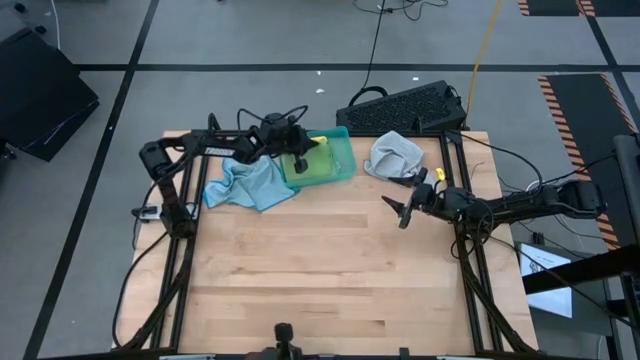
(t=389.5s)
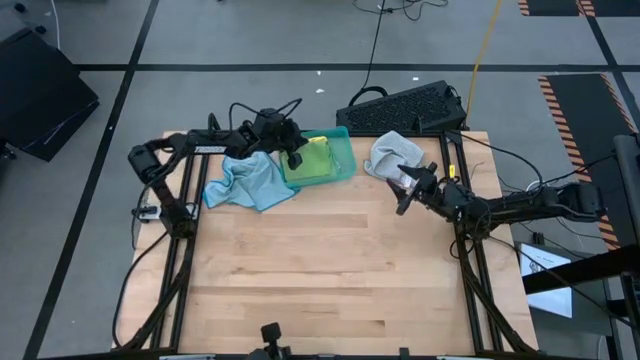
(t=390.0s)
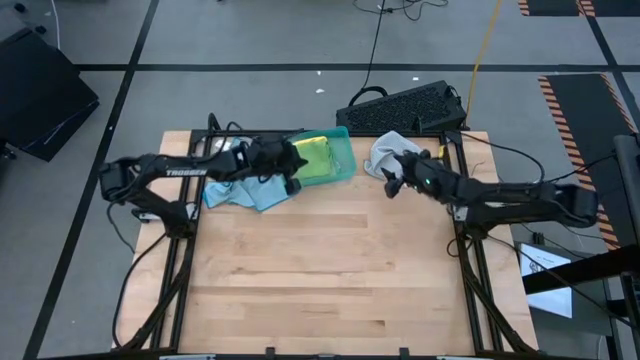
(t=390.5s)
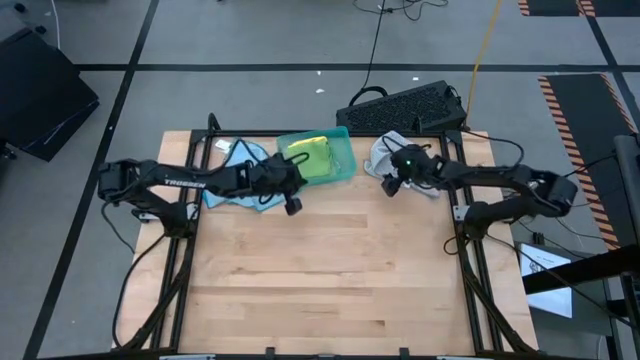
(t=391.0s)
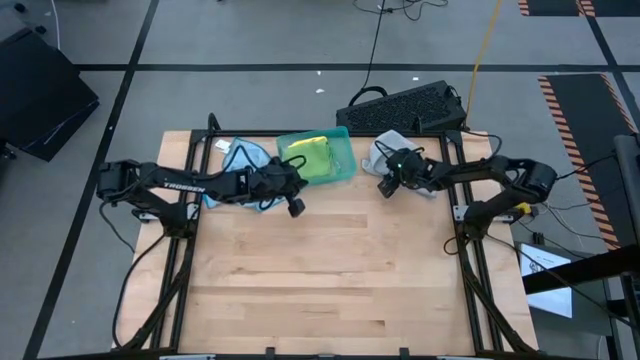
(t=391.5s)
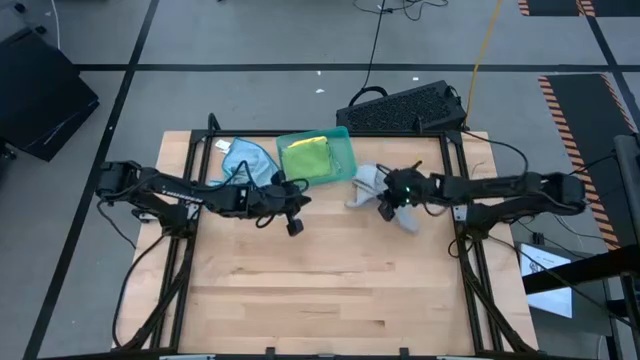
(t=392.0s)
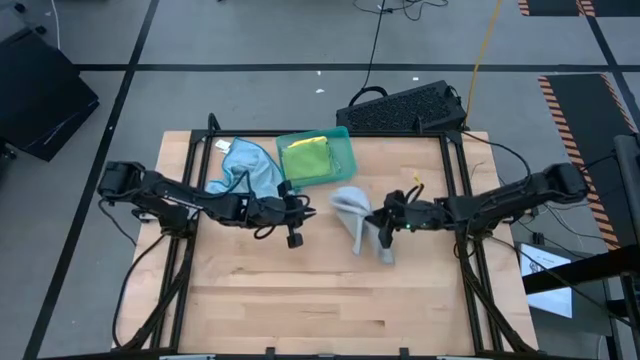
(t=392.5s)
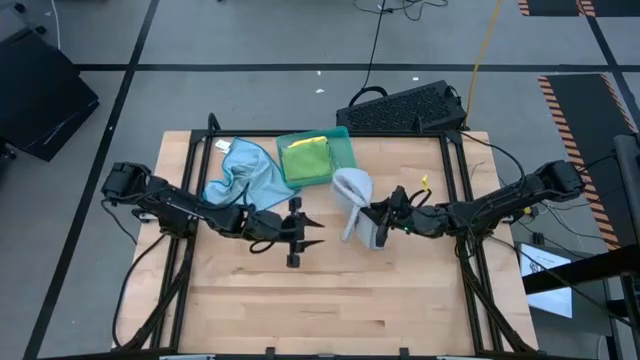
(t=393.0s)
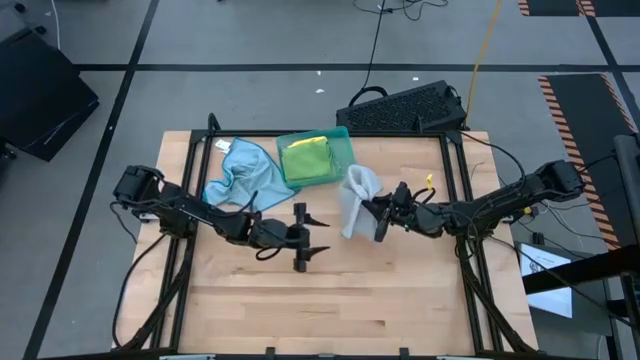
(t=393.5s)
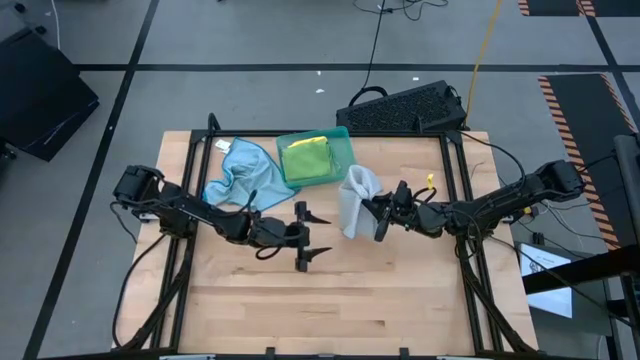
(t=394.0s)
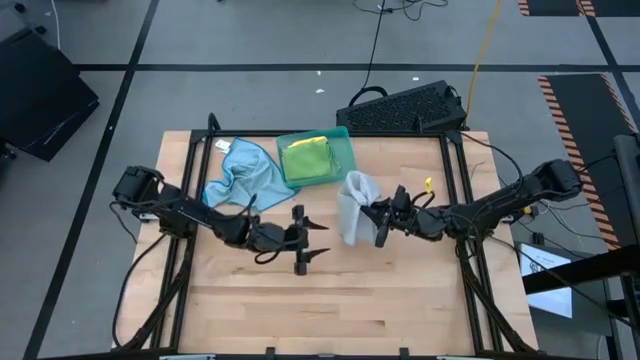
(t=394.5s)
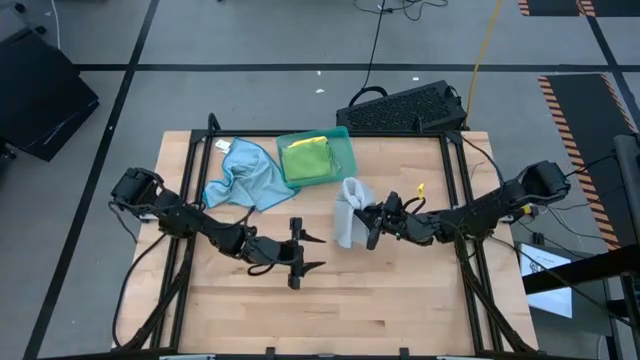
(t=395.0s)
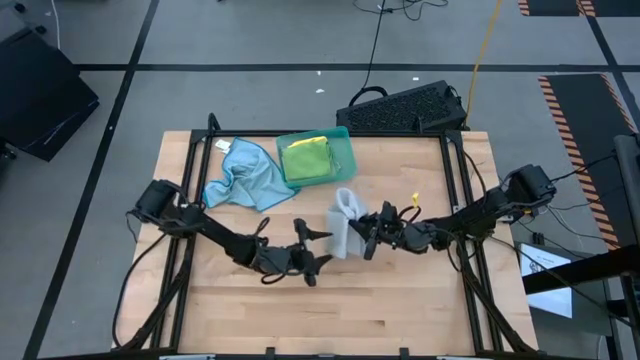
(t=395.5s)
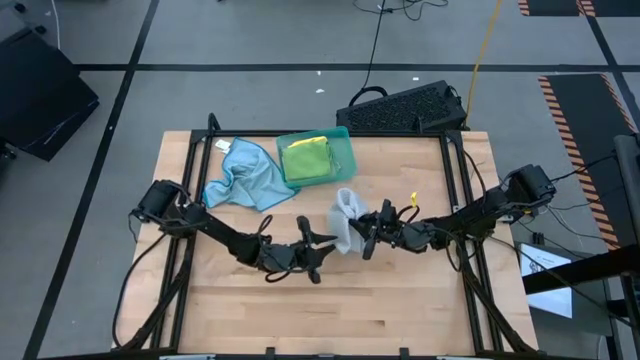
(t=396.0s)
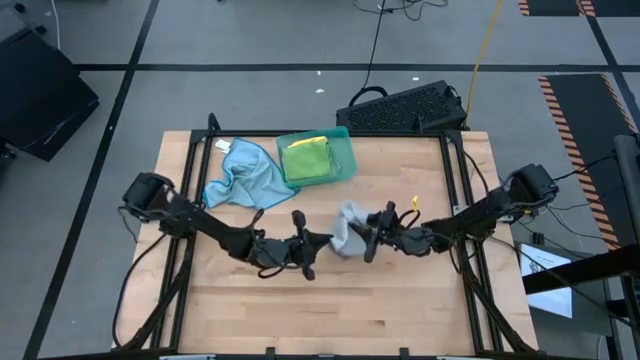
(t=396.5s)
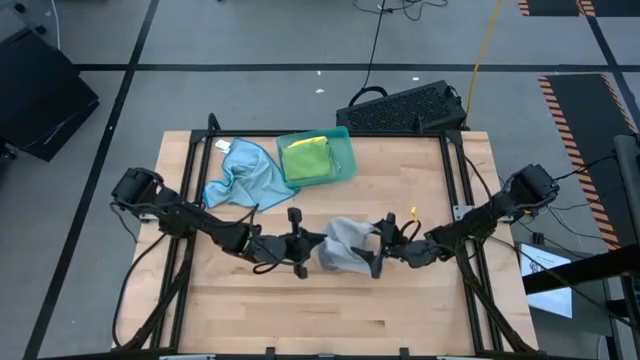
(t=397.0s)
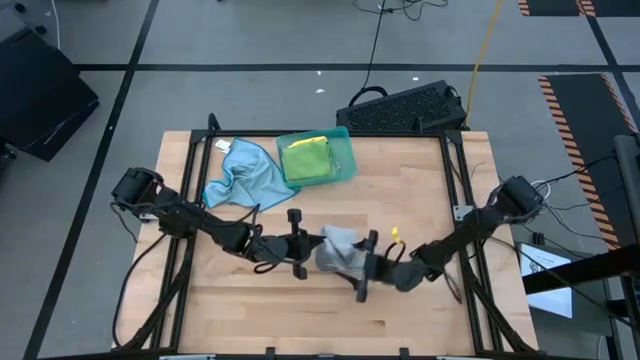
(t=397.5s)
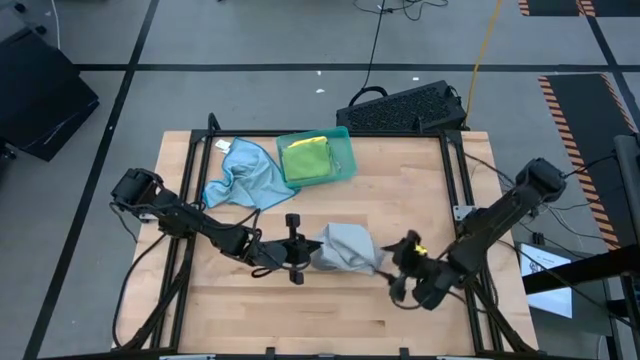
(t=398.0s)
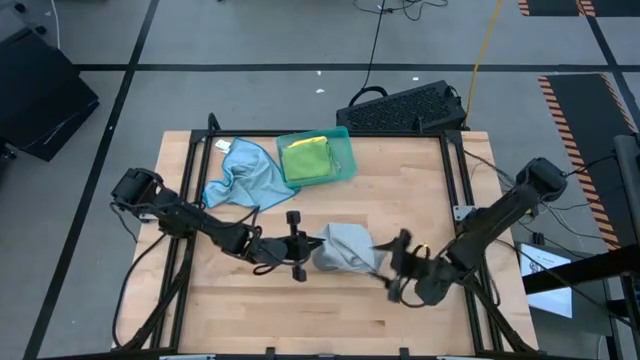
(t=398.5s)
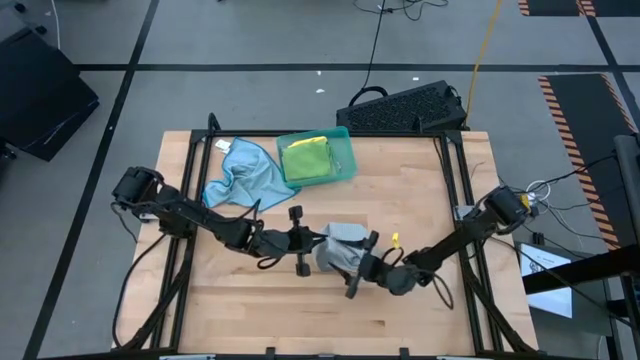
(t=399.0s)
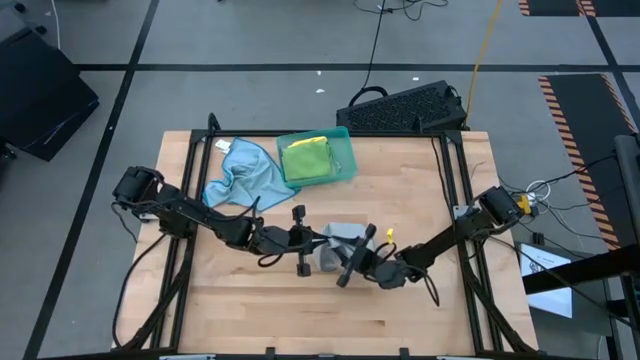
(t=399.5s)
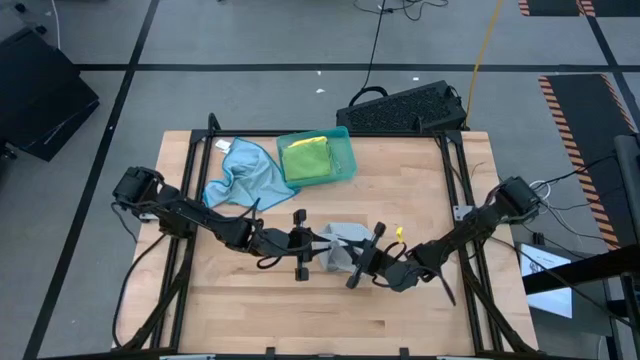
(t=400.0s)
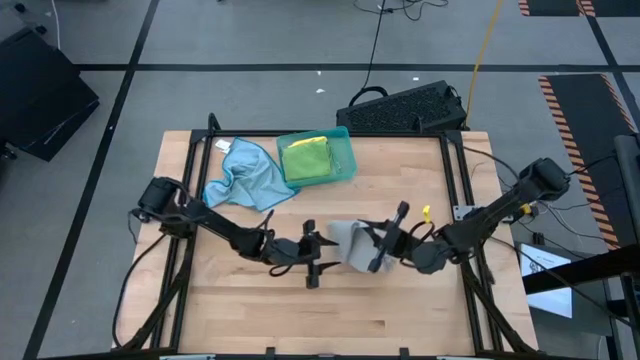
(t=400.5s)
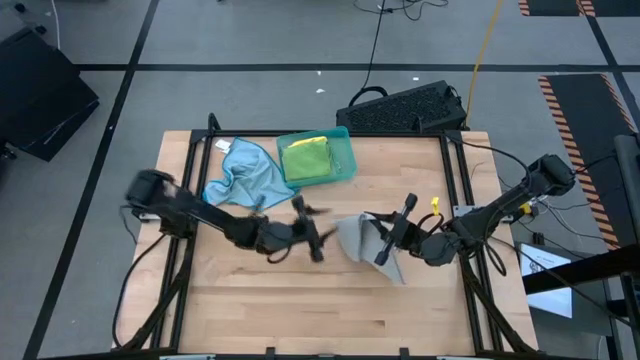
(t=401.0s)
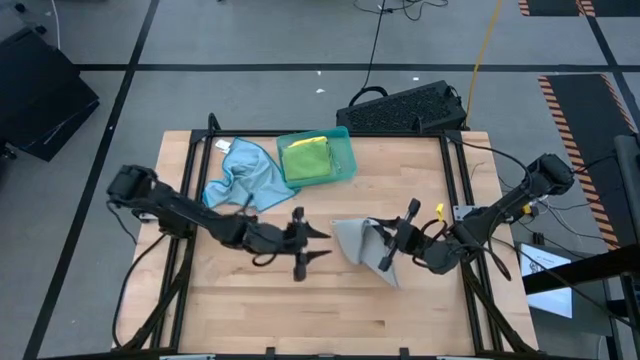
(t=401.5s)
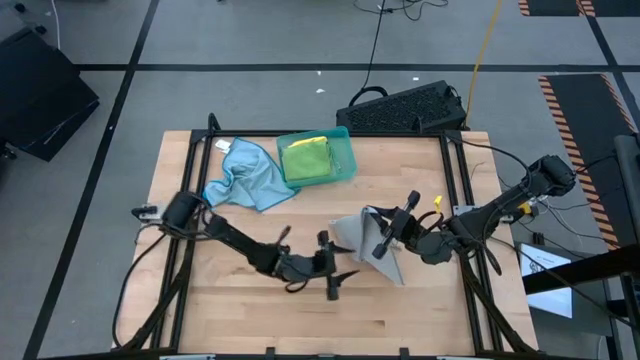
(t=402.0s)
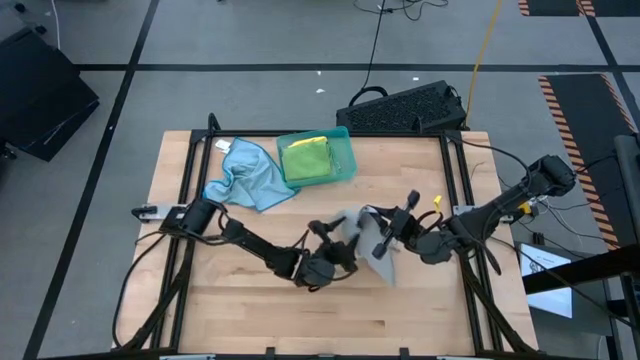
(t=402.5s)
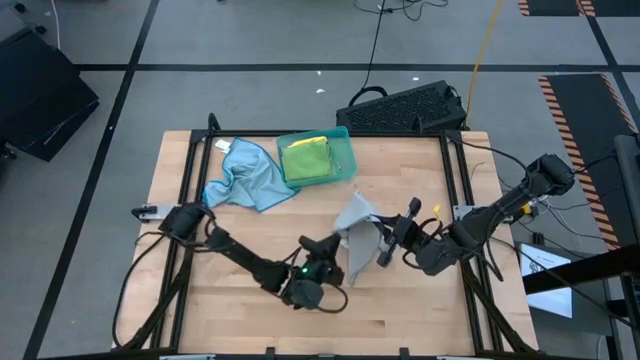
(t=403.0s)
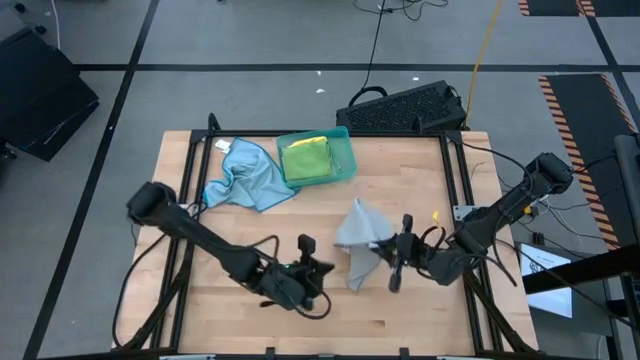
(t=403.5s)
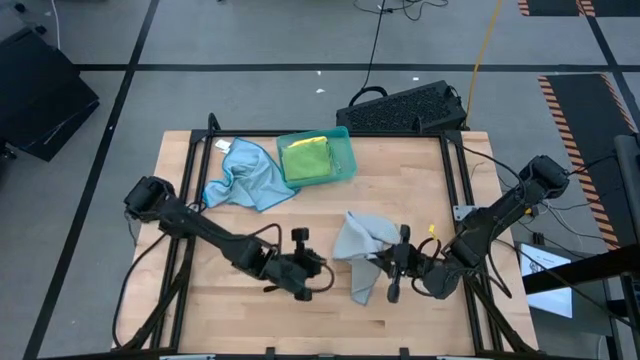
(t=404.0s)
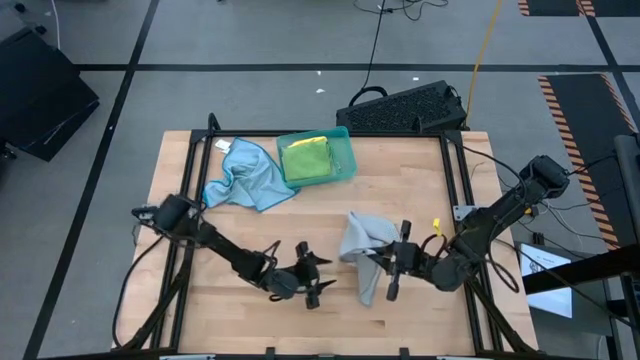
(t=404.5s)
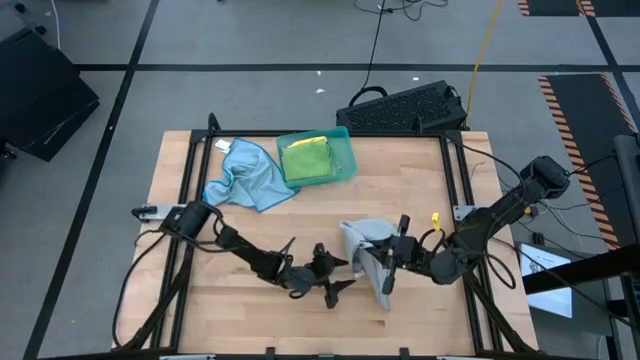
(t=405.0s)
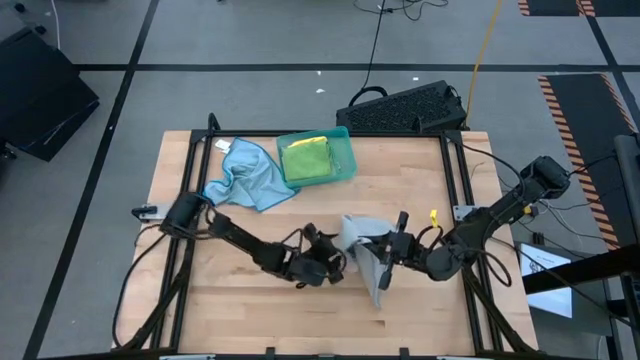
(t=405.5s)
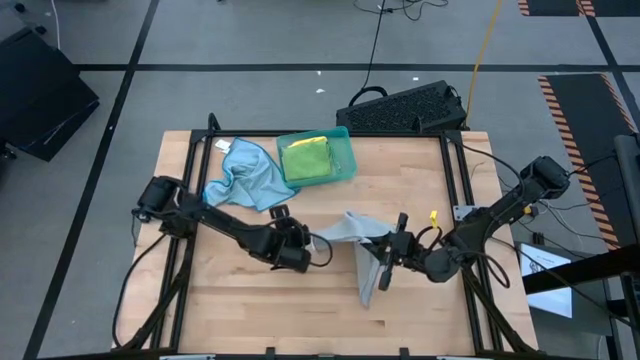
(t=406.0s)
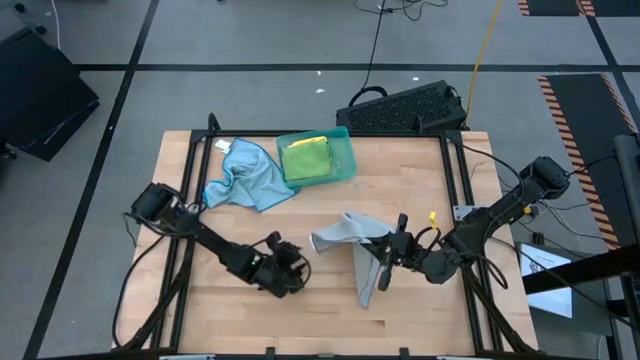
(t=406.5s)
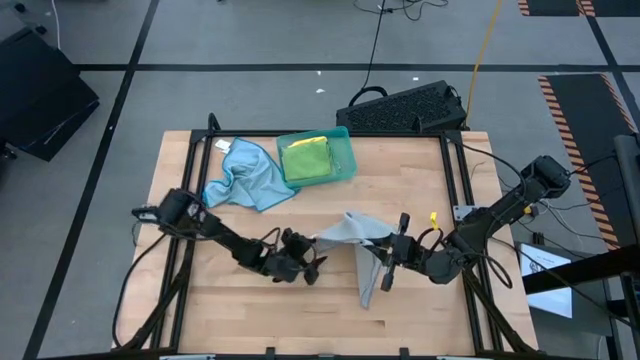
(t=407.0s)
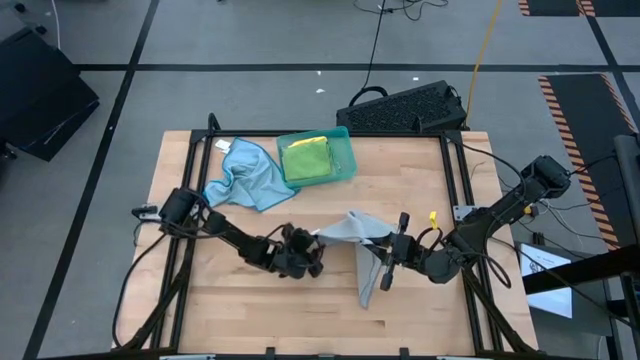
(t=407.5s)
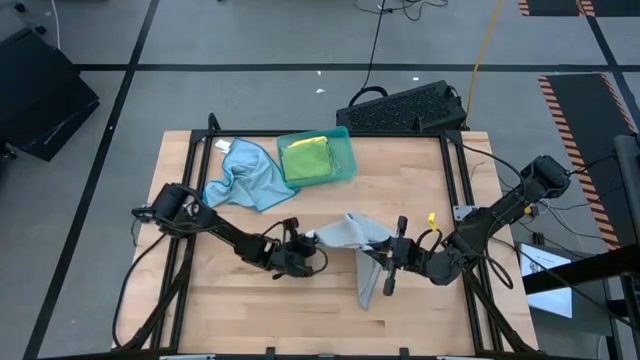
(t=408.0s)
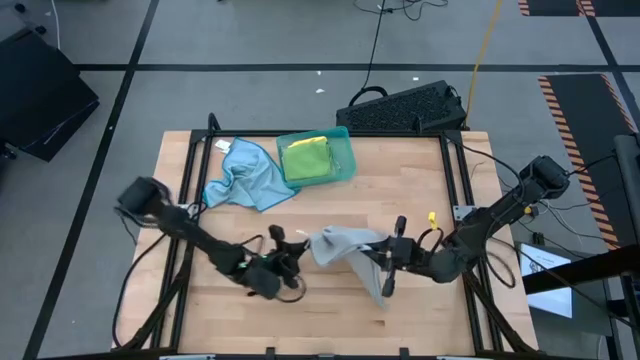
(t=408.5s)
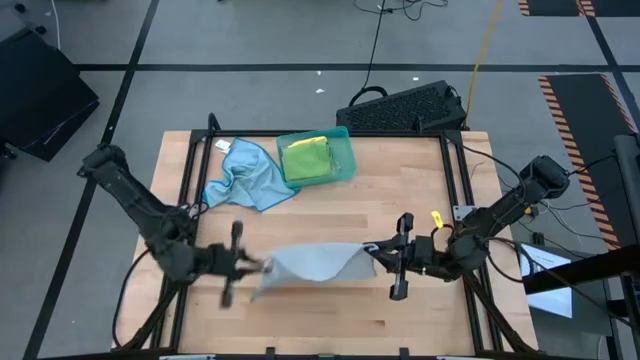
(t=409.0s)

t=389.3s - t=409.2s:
Task: Fold microfiber towels
Fold the gray microfiber cloth

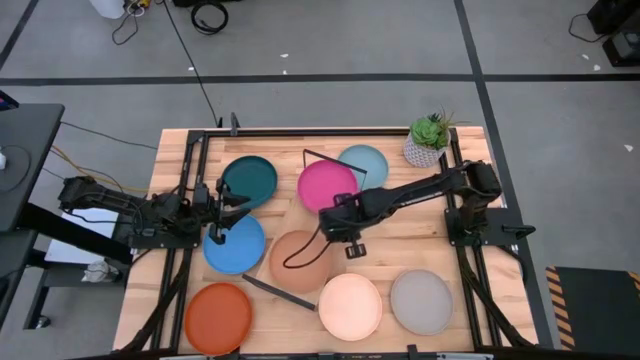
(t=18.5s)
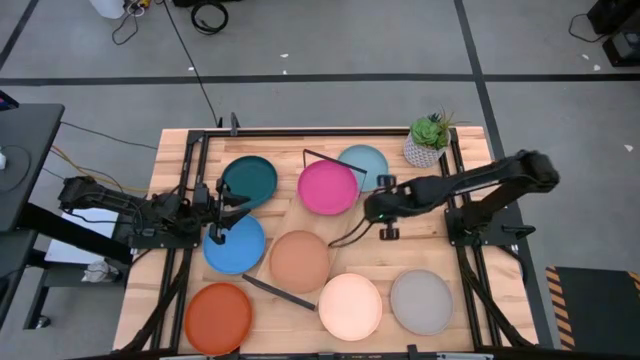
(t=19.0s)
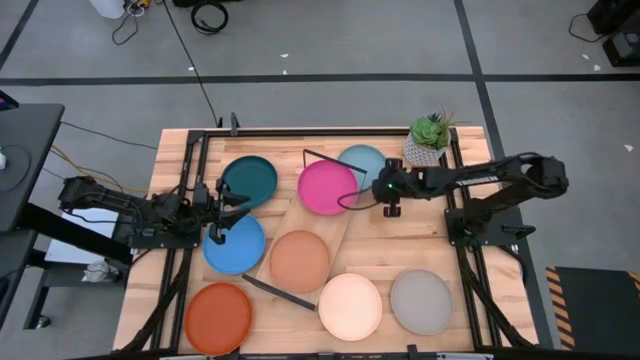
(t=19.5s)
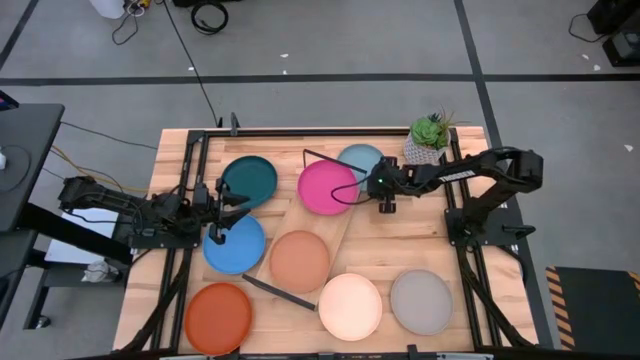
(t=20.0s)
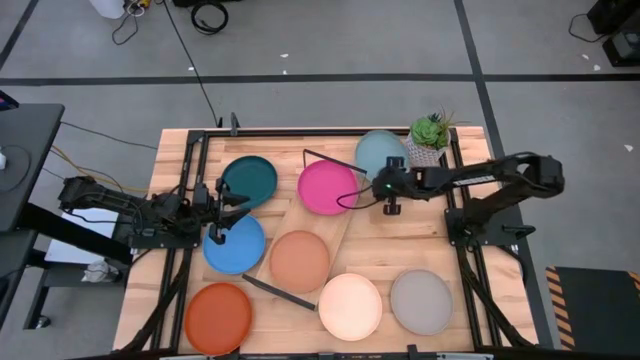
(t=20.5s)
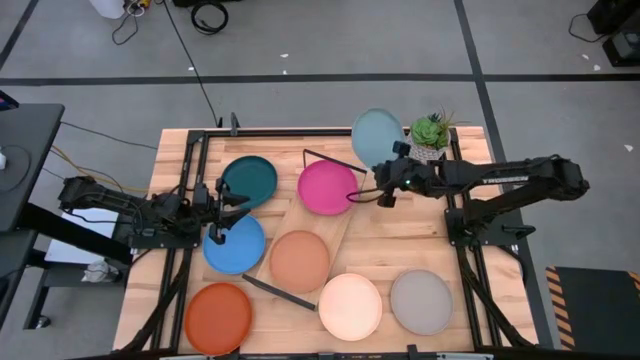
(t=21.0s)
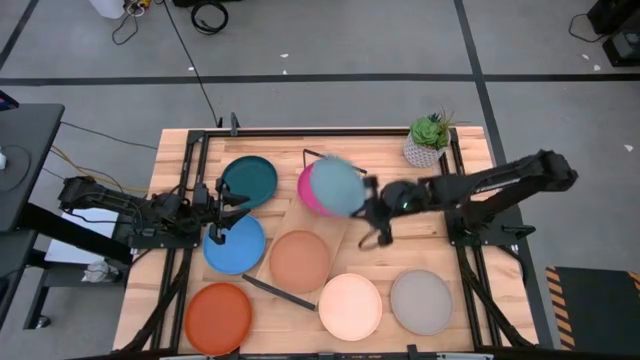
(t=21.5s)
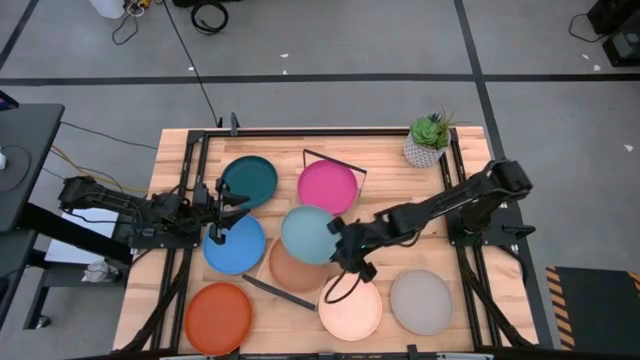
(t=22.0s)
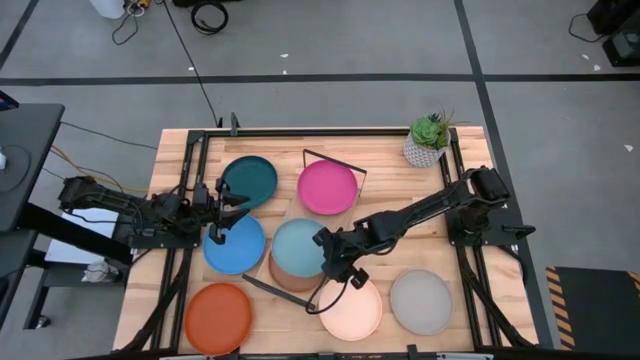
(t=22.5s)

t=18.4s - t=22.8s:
Task: Place and stack plates onto a shelf
Stack the light blue plate on top of the brown plate on the shelf
